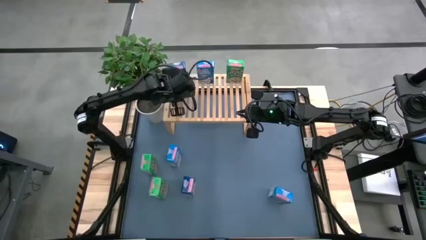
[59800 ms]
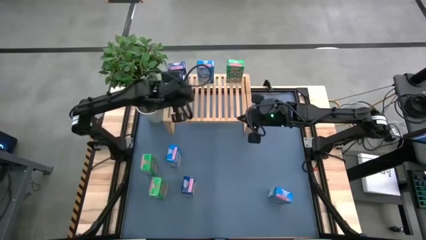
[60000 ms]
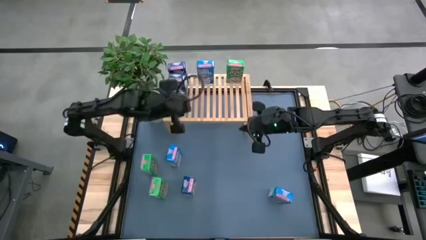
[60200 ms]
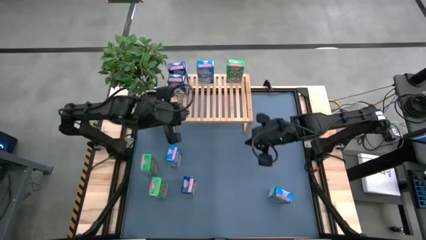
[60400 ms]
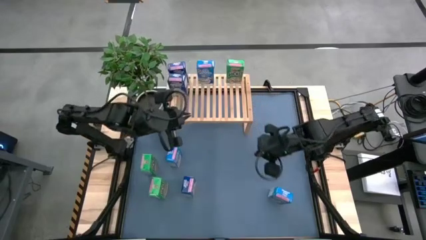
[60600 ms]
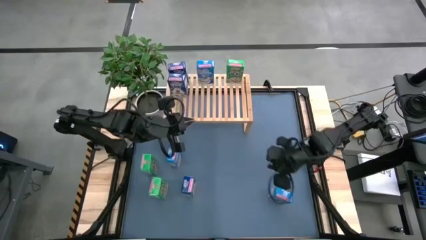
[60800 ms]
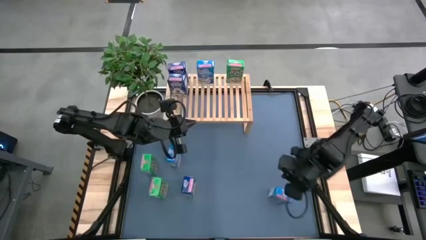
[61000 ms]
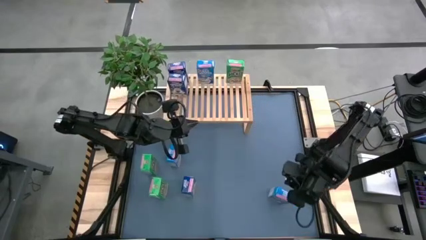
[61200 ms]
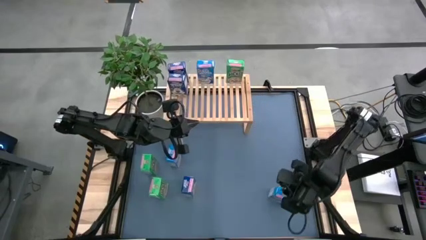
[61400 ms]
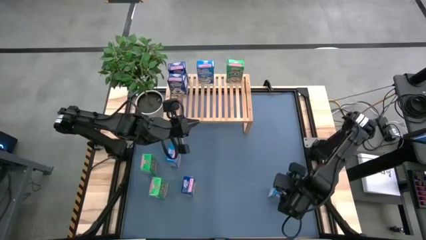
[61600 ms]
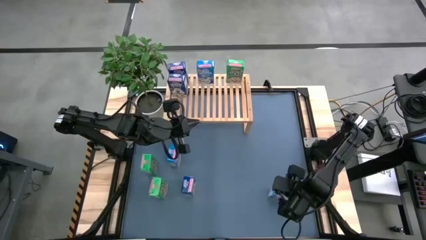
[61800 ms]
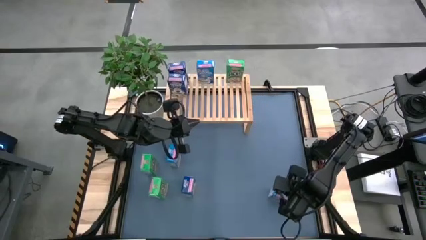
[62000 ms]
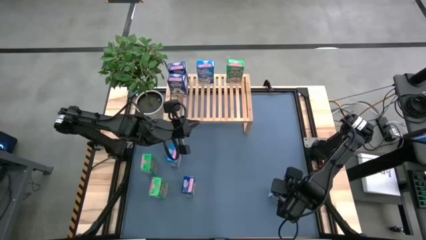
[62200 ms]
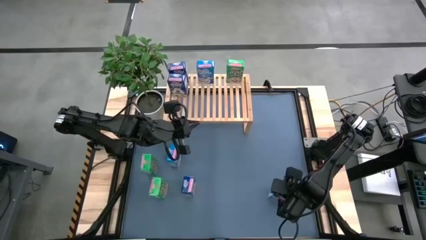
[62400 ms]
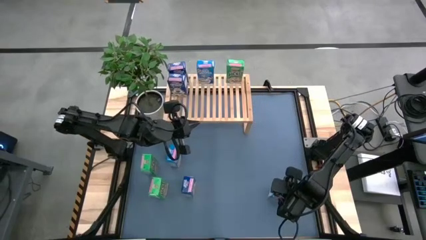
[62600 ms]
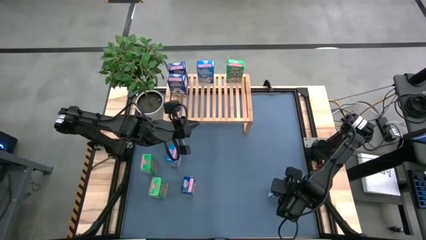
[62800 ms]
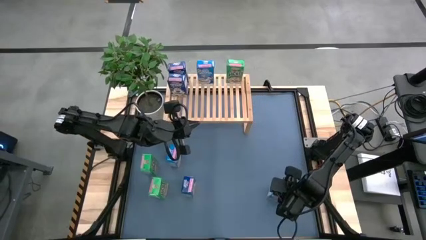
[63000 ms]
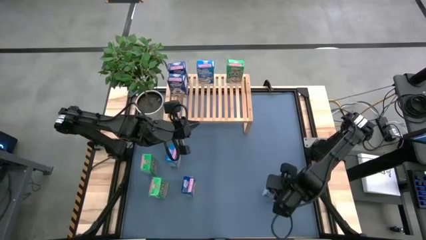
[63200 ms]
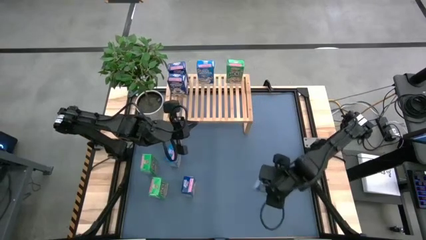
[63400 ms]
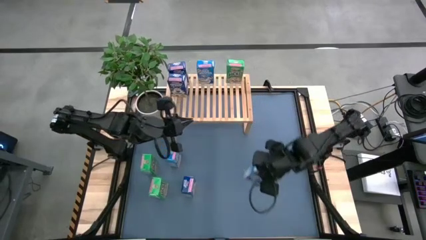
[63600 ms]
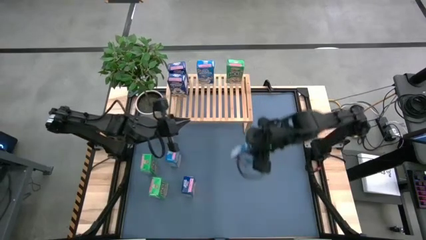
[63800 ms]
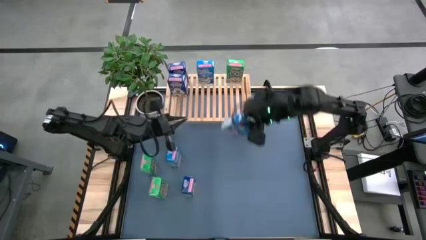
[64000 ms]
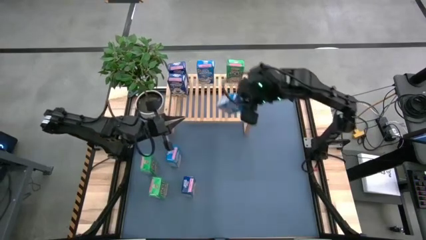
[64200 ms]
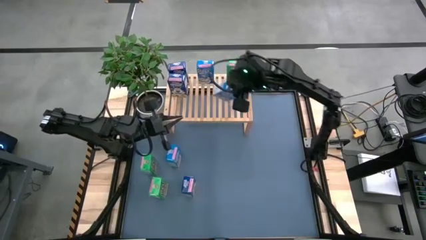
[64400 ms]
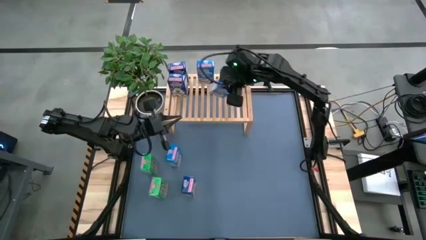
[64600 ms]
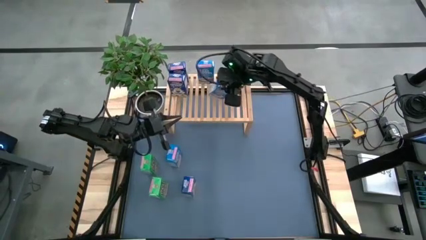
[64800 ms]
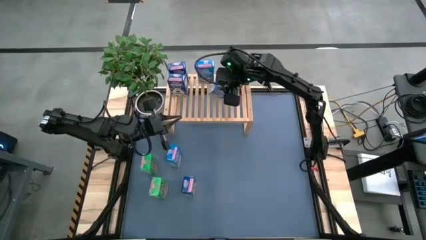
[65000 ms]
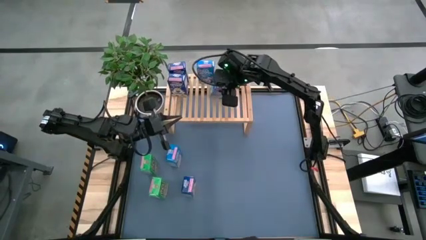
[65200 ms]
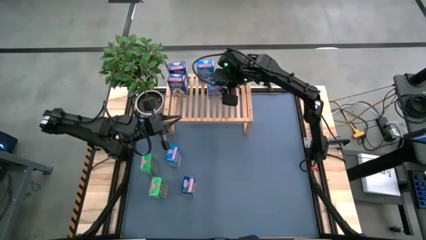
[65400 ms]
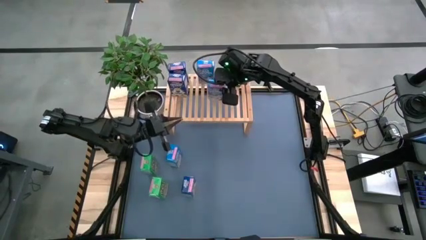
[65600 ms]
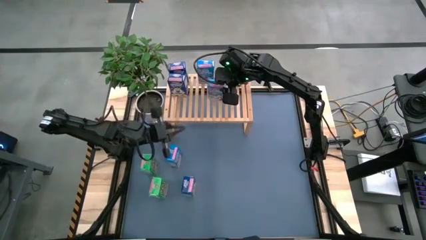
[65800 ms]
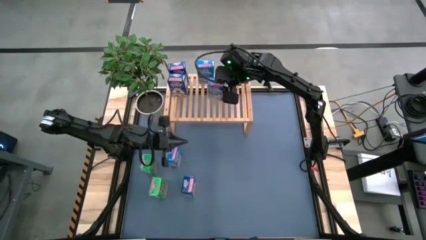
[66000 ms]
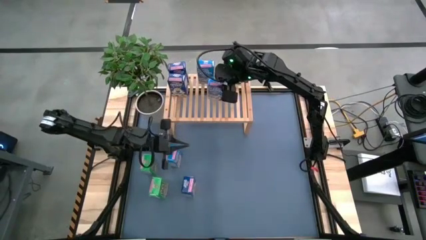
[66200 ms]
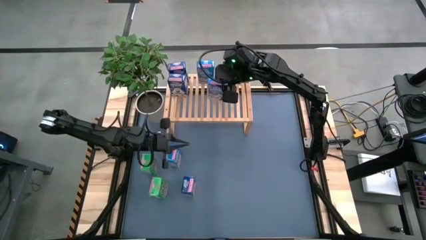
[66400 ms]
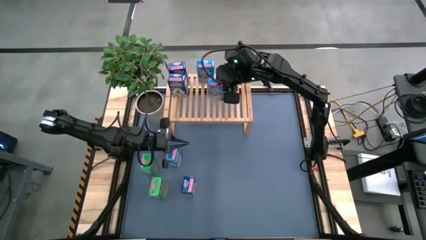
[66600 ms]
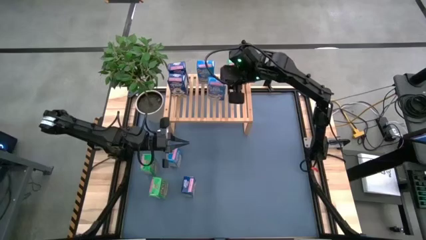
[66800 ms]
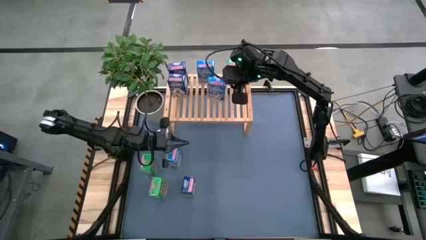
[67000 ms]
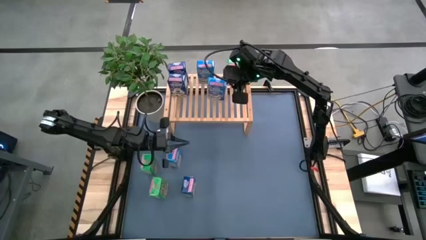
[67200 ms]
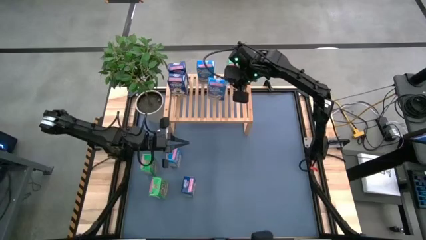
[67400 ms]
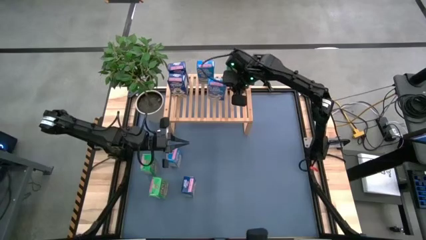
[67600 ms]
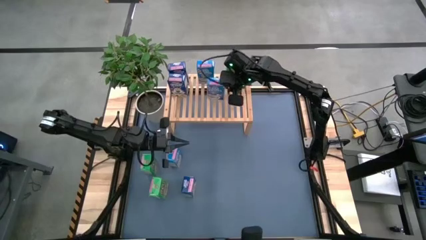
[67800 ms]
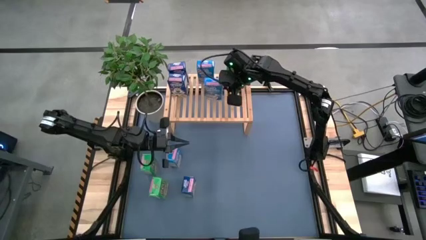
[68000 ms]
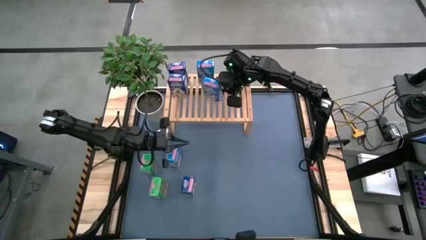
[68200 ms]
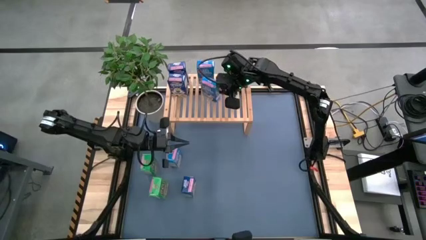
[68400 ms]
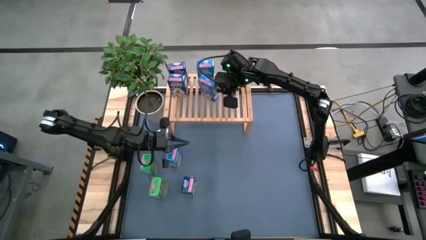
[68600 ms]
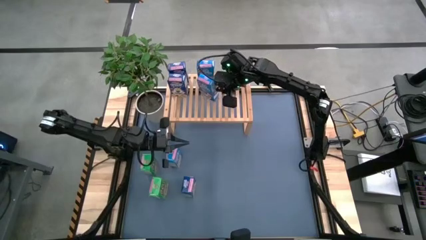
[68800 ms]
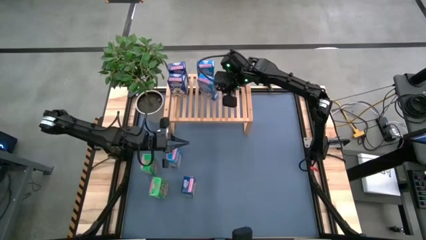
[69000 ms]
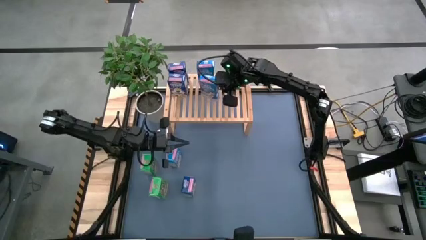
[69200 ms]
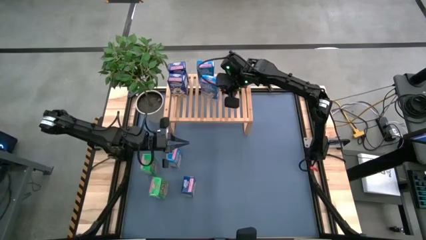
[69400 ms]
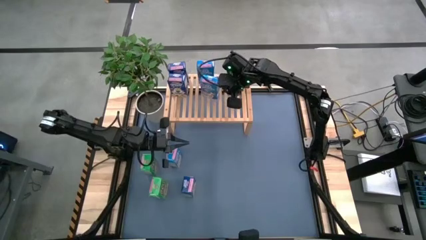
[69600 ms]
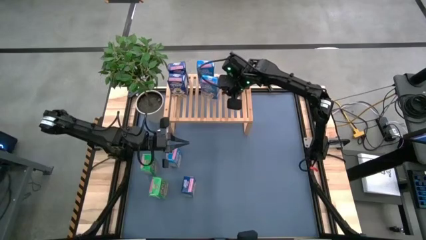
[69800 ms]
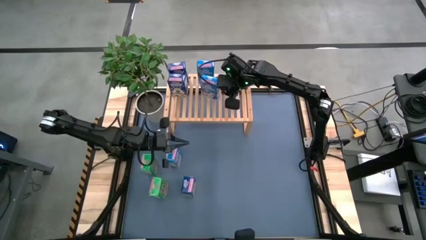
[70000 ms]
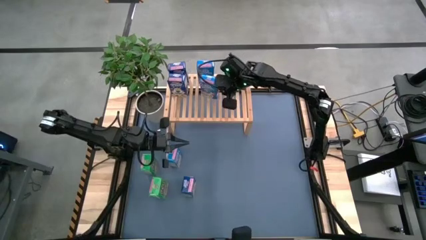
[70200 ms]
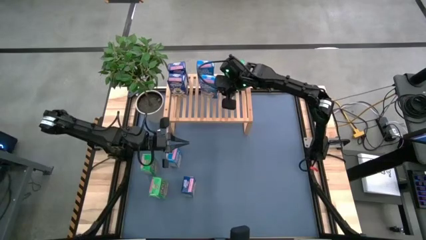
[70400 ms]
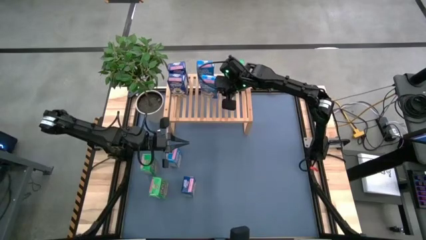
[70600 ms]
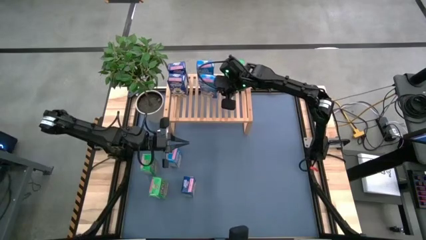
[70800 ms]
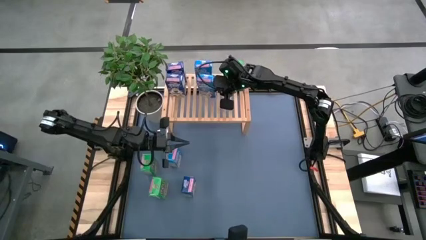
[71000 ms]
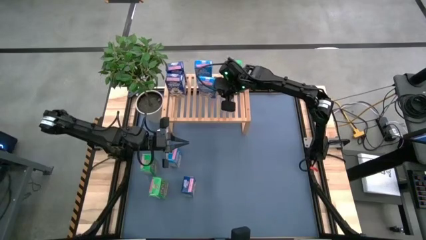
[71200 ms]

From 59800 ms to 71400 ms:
Task: Stack cereal on shelf
Put the bottom light blue cereal box on the shelf aligned with the light blue cereal box

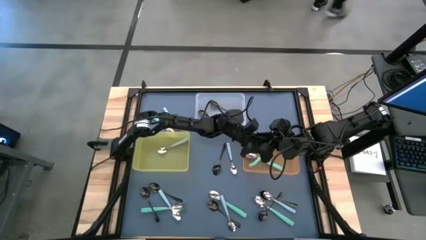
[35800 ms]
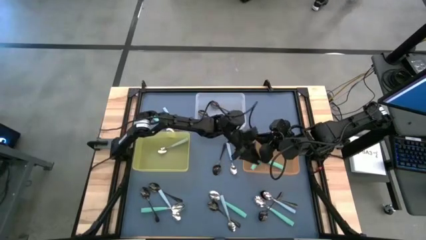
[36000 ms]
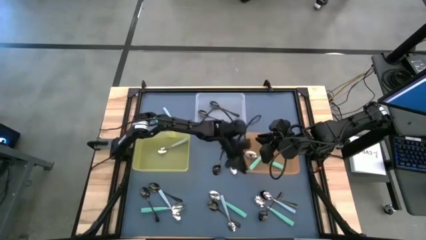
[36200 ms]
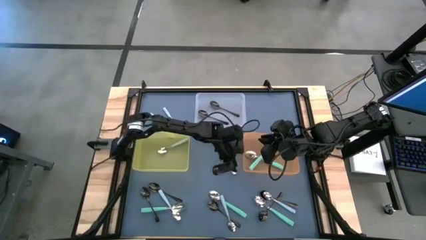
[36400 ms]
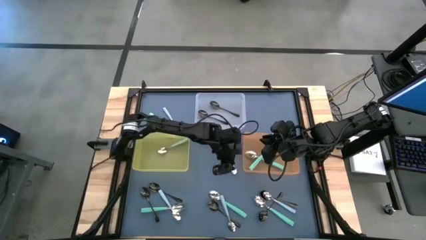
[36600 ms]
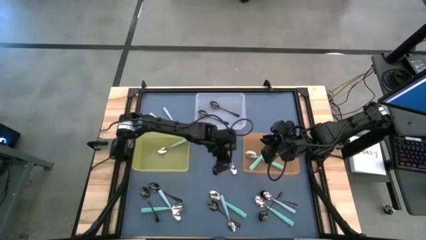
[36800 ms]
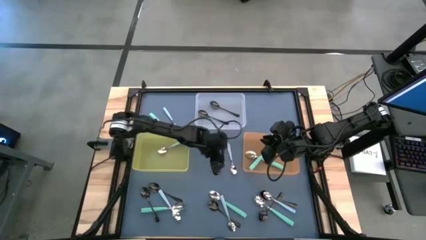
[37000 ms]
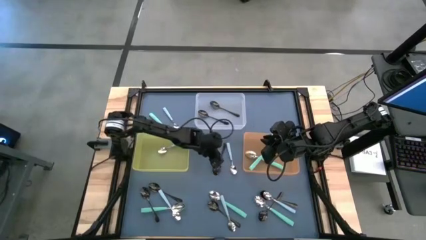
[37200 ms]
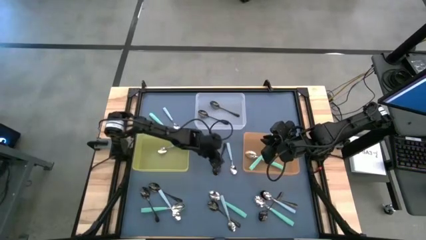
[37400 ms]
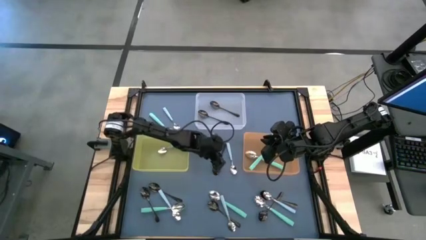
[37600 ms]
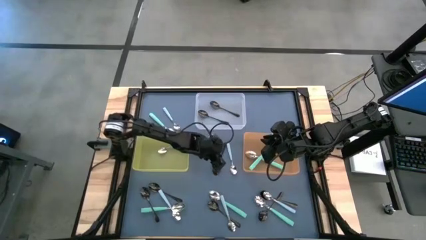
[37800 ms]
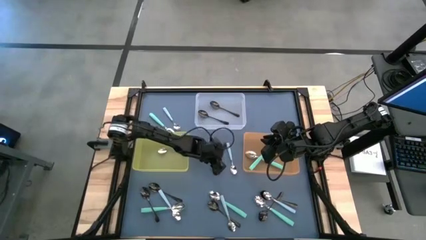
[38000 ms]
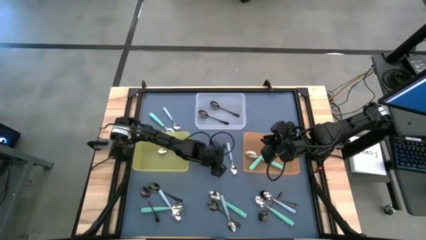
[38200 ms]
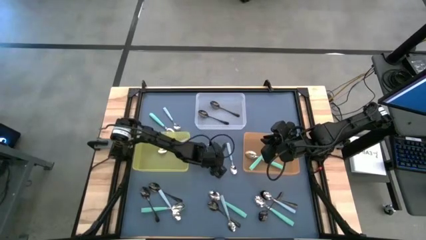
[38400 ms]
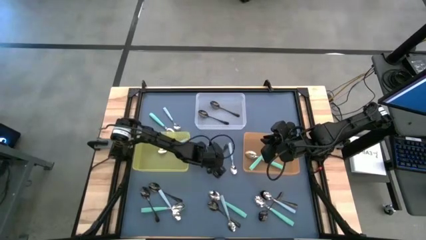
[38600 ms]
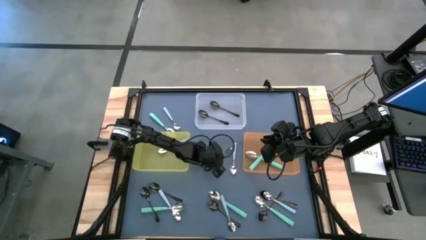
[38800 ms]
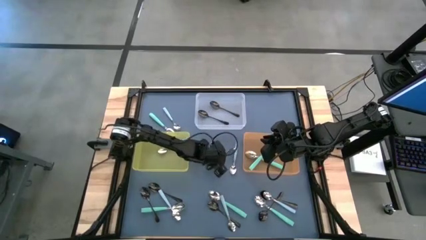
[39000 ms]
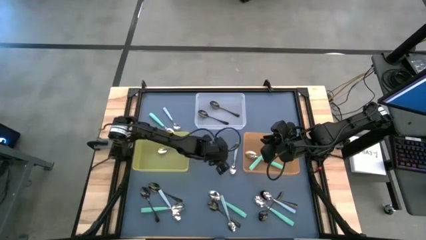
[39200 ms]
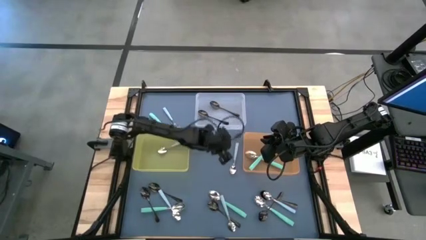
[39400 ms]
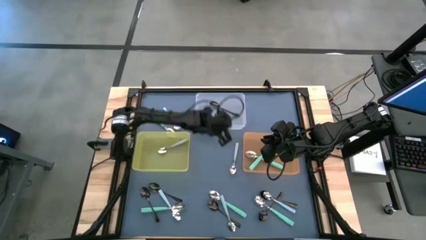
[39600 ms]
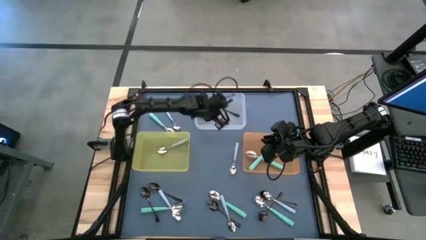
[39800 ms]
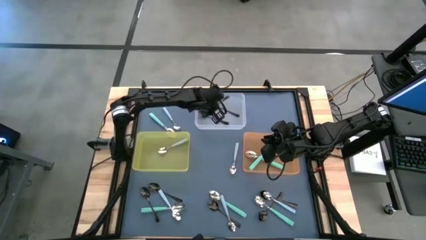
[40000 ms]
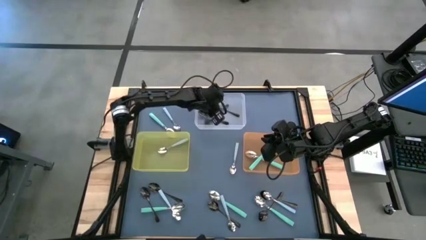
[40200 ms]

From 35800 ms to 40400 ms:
Task: Sort silverware by color (type)
Put the black spoon into the transparent bin
